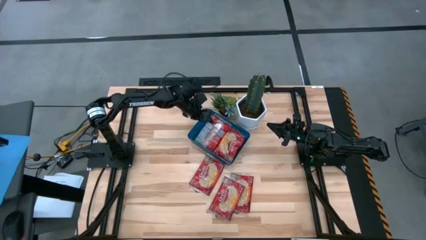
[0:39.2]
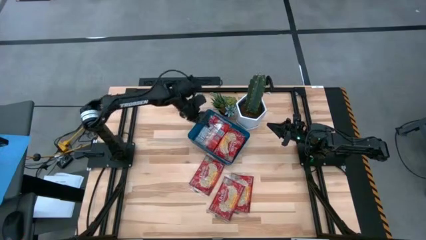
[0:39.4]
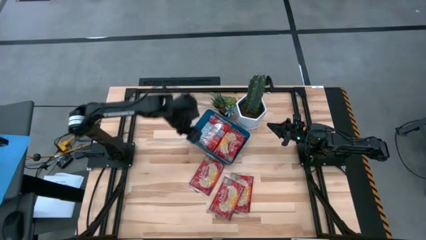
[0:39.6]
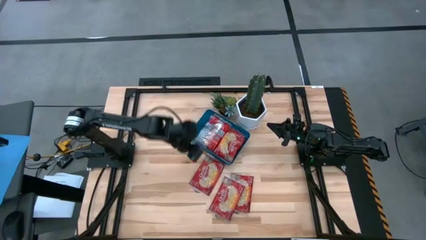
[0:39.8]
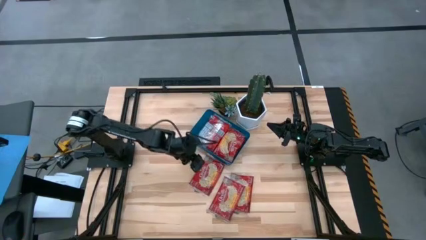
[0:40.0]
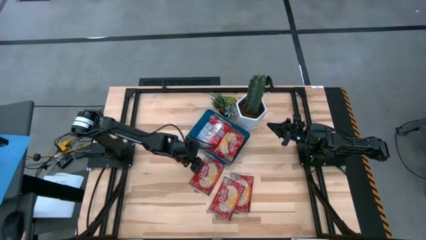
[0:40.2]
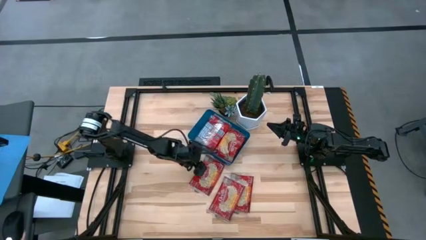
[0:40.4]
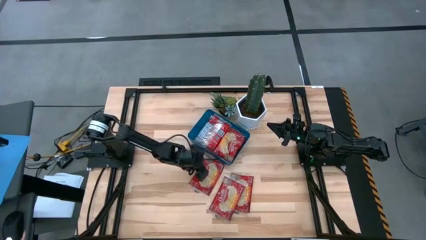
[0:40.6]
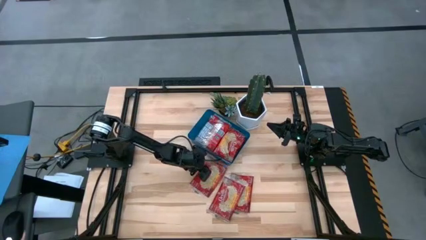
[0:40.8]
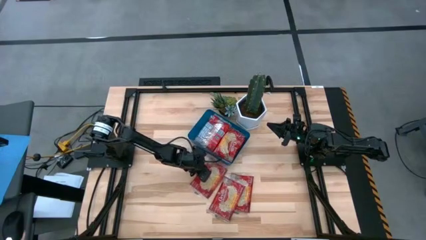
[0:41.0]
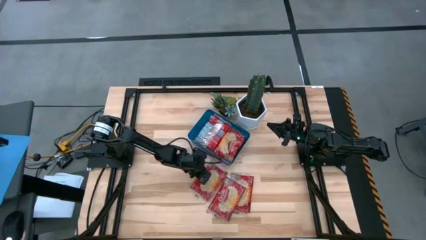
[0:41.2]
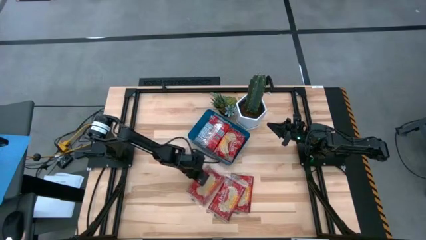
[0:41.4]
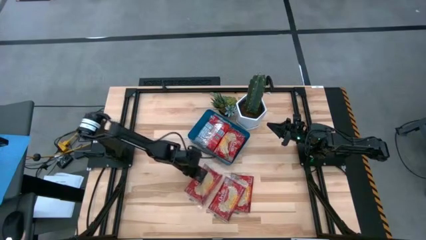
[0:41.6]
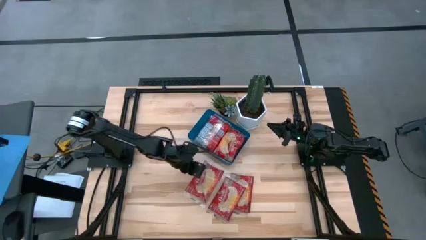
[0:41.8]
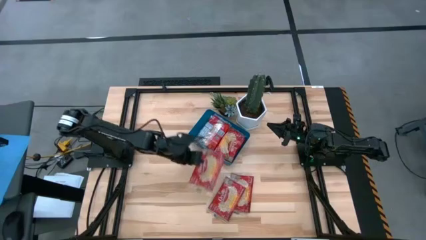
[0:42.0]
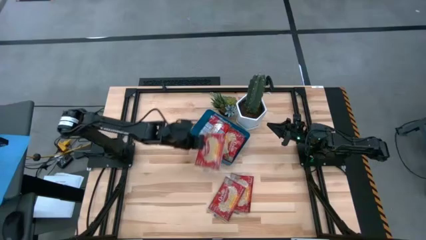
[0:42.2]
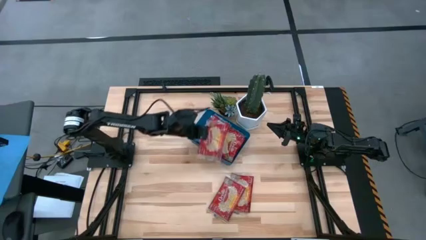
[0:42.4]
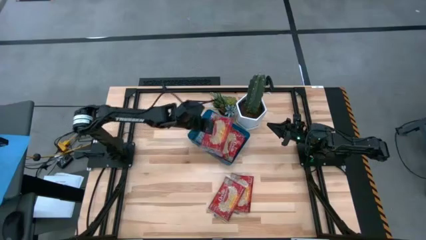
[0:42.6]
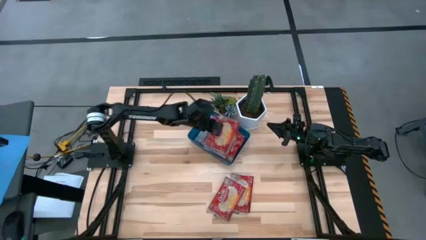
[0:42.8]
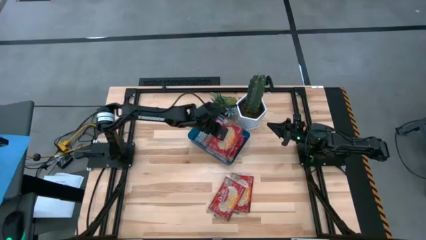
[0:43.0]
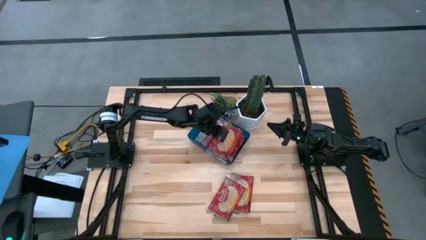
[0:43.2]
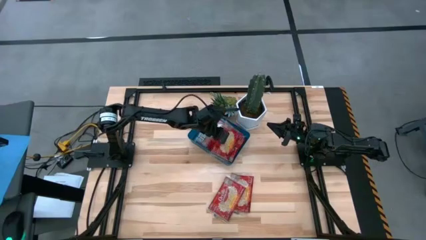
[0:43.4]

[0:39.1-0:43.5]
Task: Sort popcorn bags into baskets
Put the popcorn bag into the blue bin

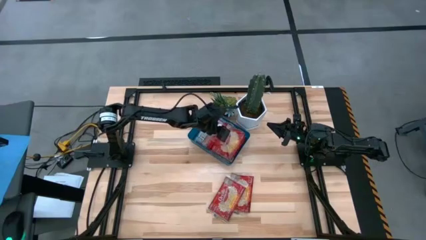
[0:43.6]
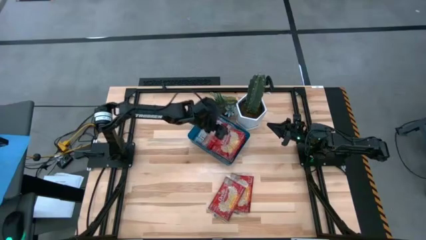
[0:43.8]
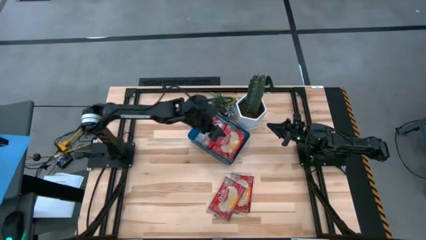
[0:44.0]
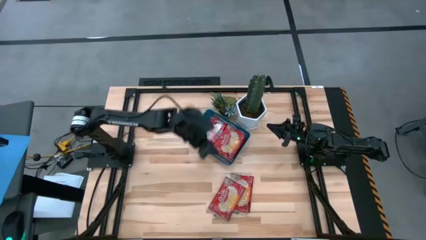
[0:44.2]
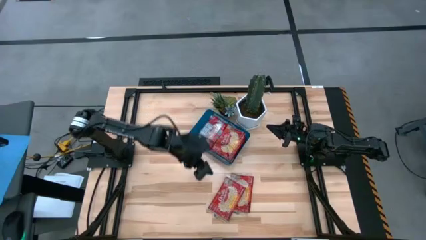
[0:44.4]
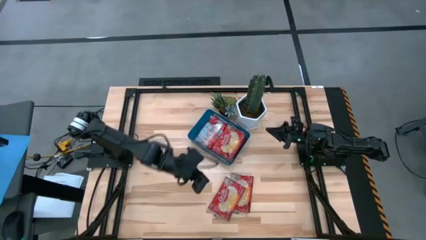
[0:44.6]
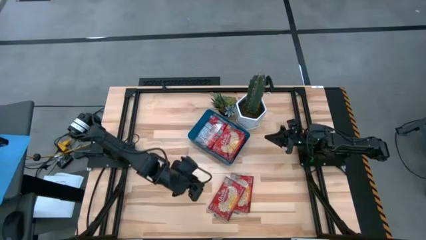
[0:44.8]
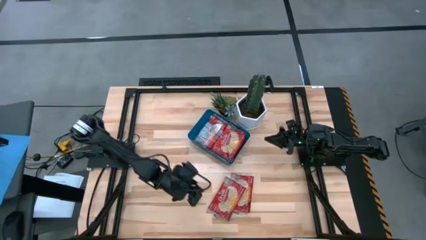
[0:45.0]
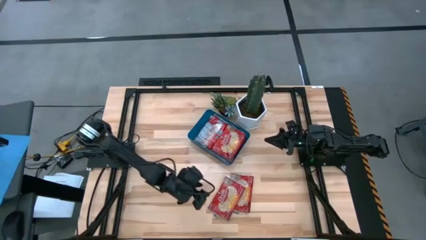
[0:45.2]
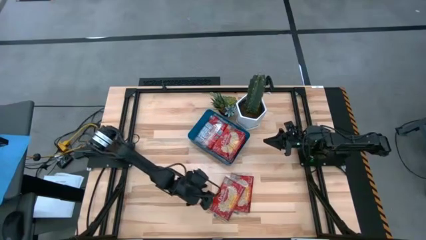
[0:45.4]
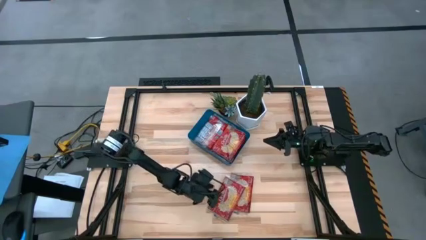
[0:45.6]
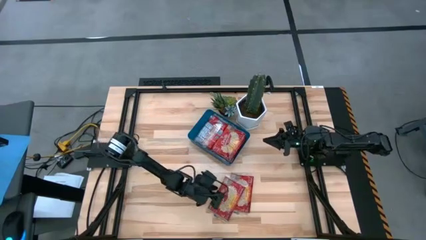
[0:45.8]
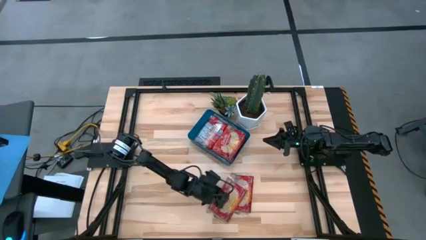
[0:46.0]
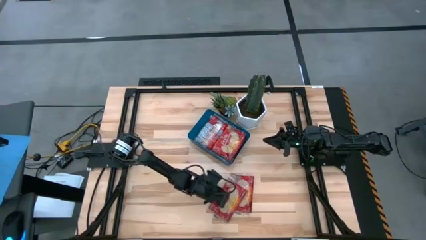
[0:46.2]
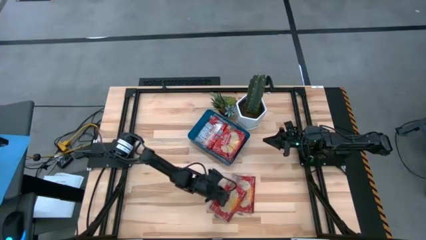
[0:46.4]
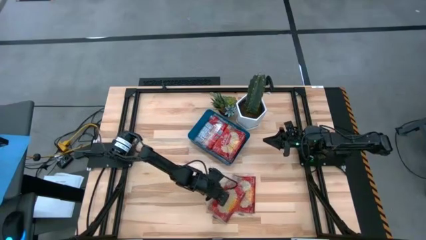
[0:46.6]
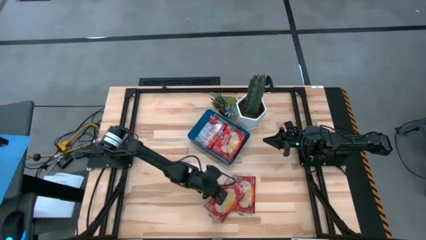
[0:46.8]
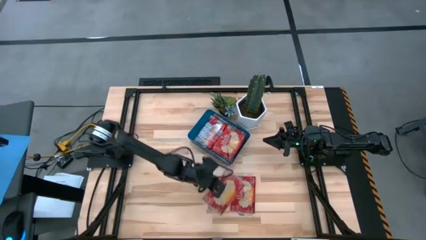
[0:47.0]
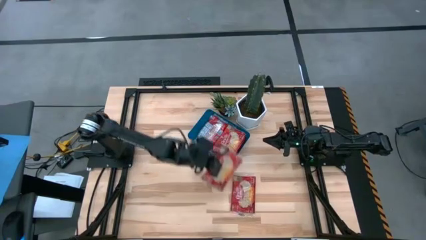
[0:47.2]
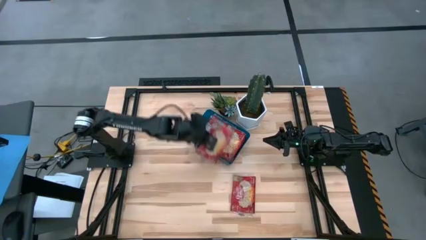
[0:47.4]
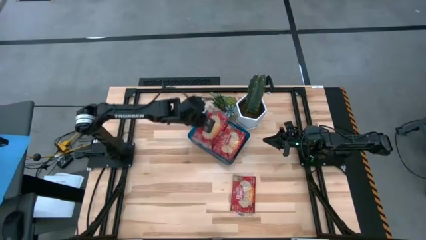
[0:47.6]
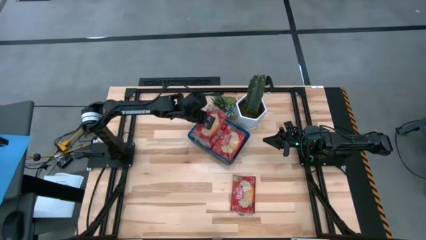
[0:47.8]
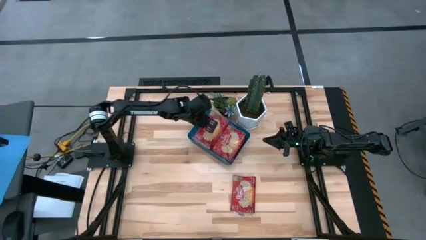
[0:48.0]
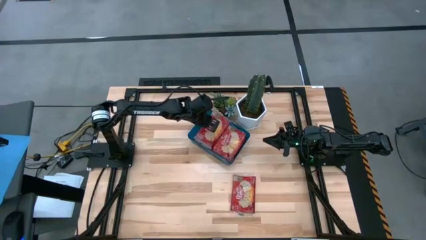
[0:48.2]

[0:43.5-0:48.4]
Put the popcorn bag into the blue bin

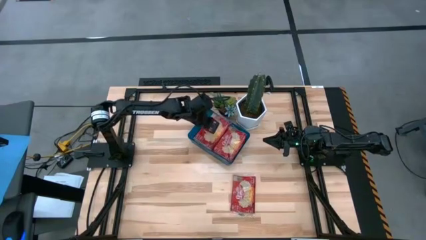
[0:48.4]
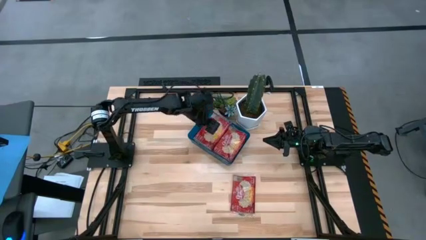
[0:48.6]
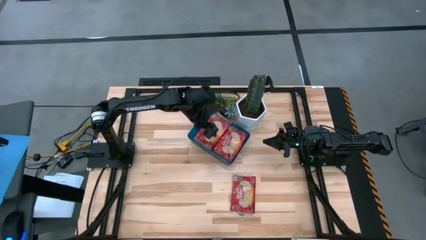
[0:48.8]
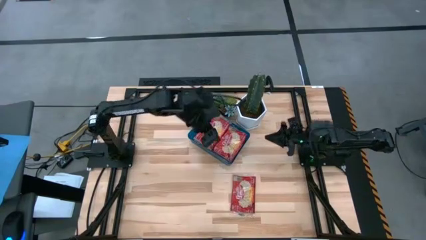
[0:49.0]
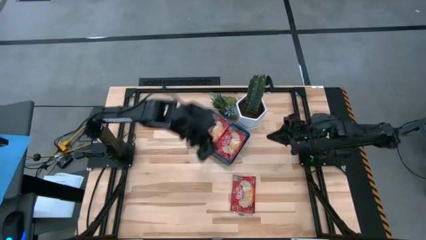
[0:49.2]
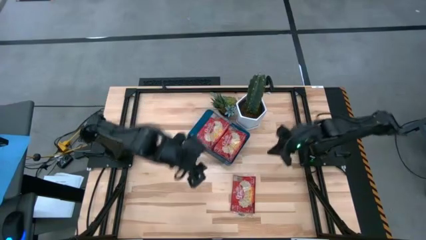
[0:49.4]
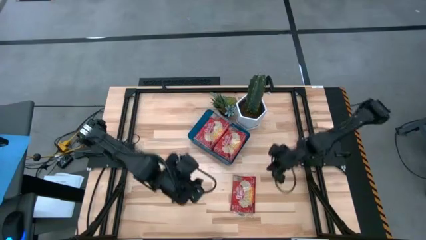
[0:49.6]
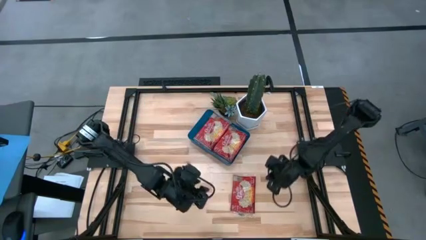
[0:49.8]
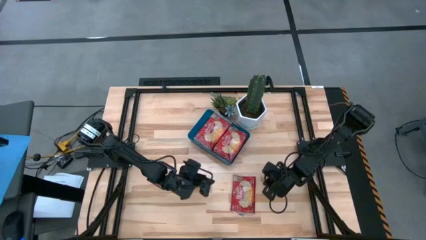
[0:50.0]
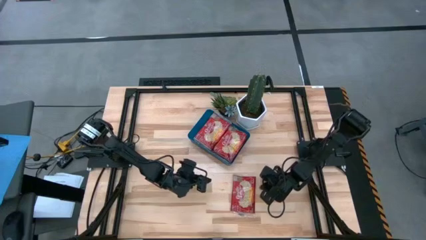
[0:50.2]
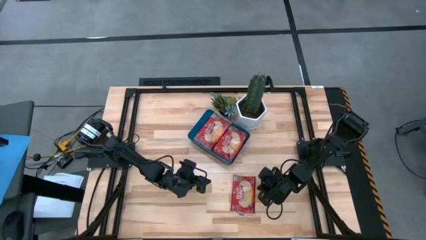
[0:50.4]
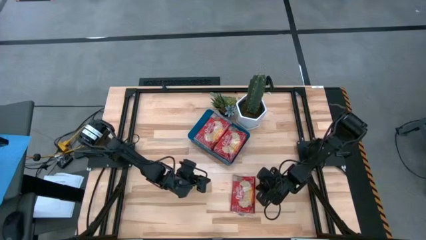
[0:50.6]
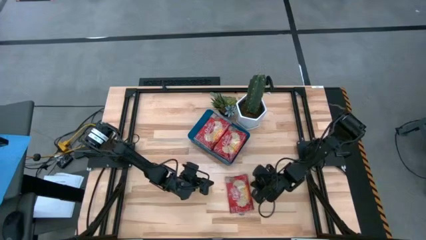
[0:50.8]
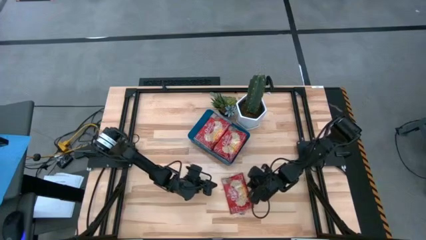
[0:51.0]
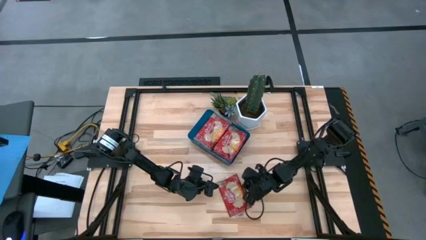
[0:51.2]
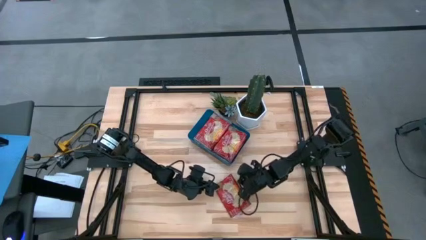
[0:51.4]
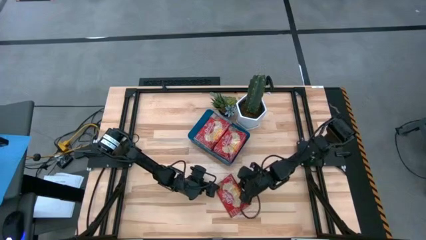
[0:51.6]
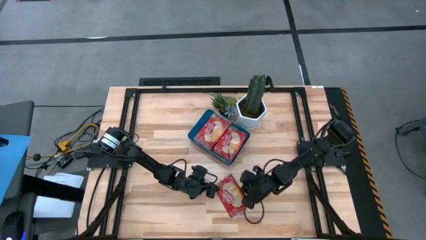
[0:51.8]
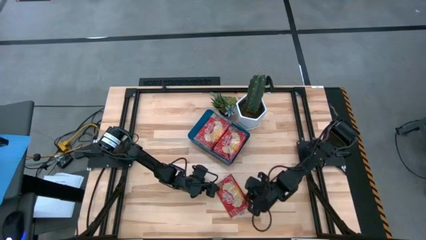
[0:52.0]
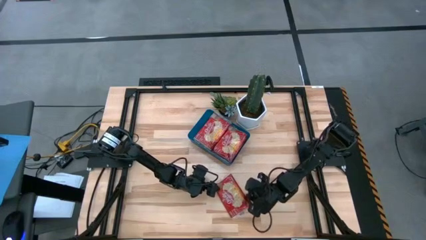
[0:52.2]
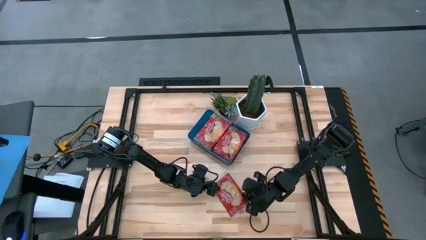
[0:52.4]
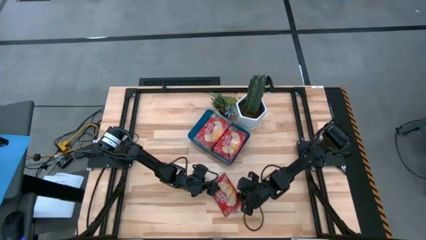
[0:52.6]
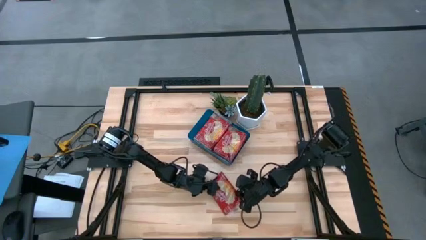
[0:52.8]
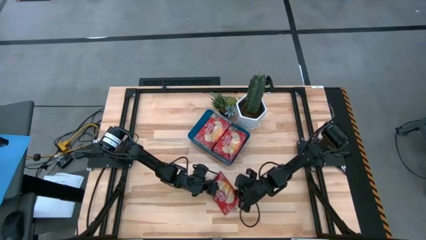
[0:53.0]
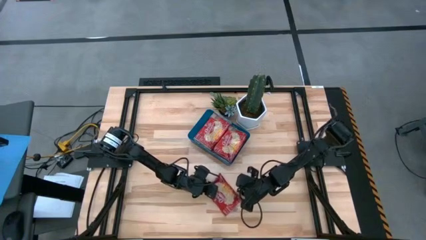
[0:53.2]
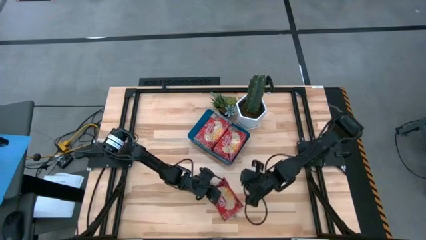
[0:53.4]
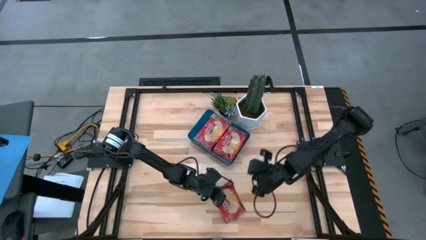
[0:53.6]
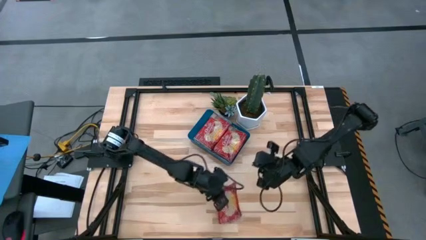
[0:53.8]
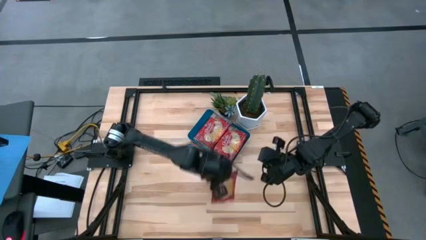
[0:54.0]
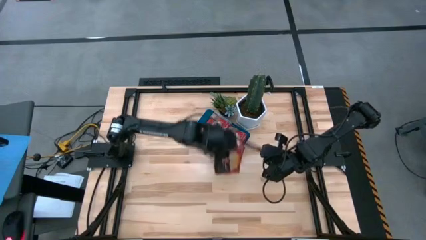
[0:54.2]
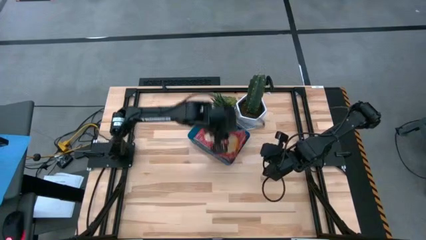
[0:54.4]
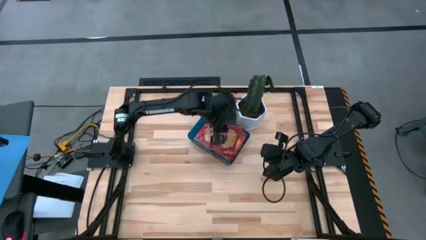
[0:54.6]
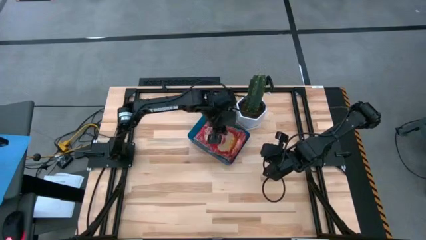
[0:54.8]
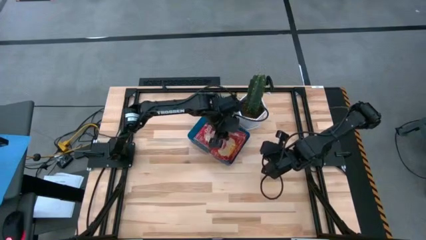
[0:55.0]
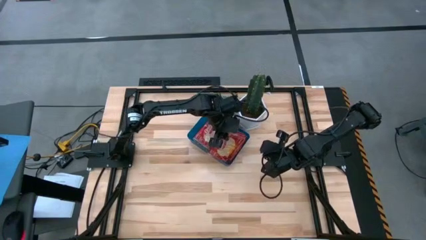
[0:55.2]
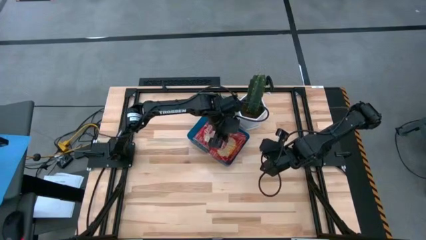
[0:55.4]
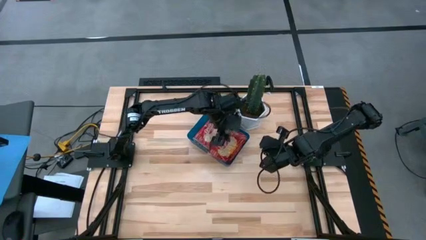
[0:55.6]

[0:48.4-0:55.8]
Put the popcorn bag into the blue bin

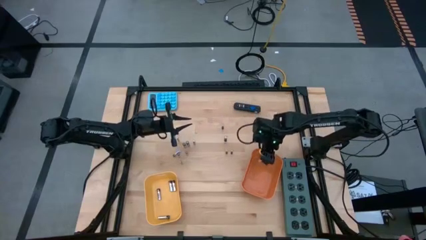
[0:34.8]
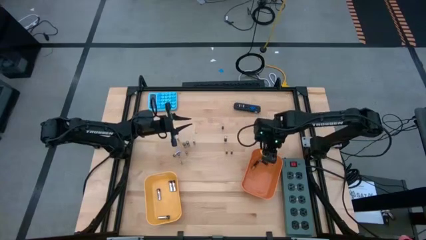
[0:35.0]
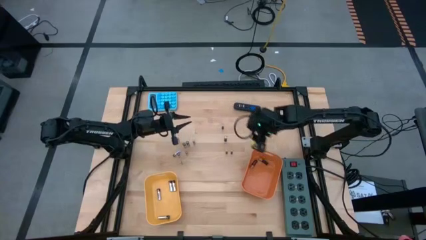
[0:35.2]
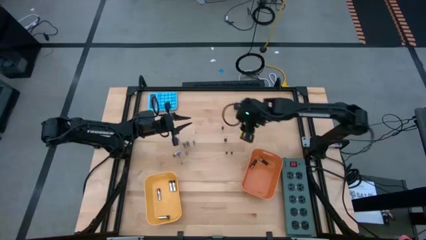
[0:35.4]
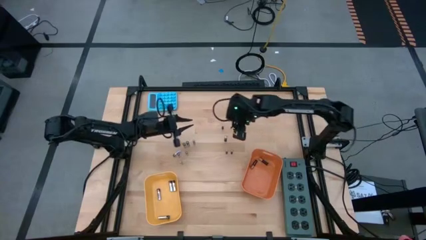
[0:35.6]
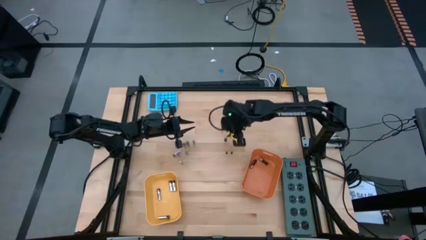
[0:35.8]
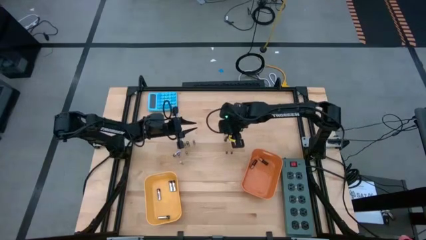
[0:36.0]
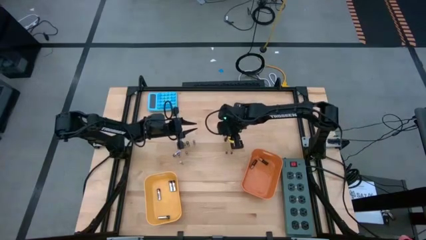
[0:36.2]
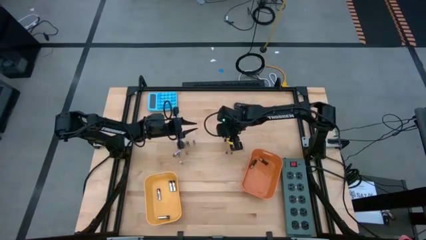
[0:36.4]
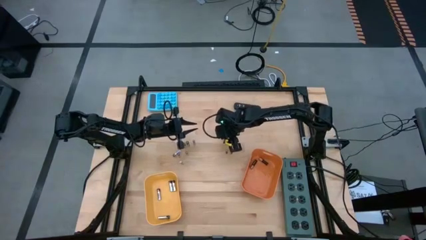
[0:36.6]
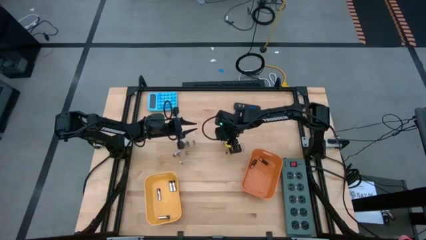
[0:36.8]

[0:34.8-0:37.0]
Task: Sort batteries
Put the brown battery into the orange bin
